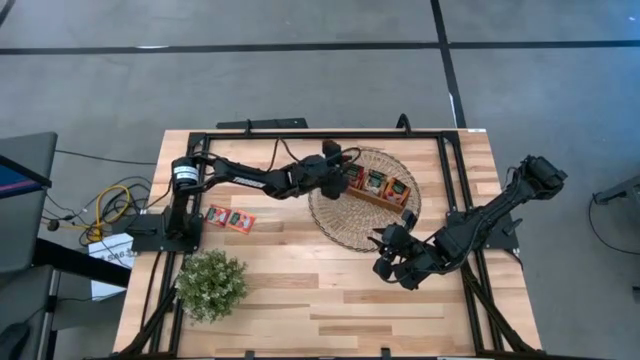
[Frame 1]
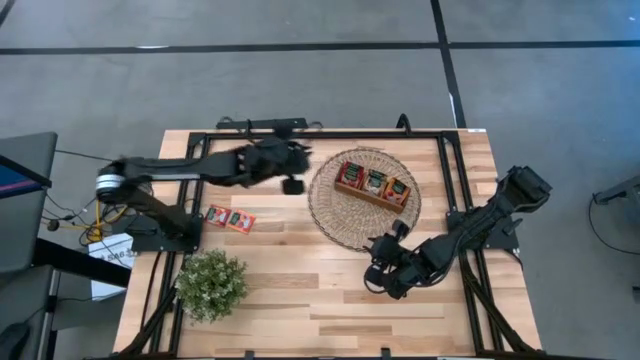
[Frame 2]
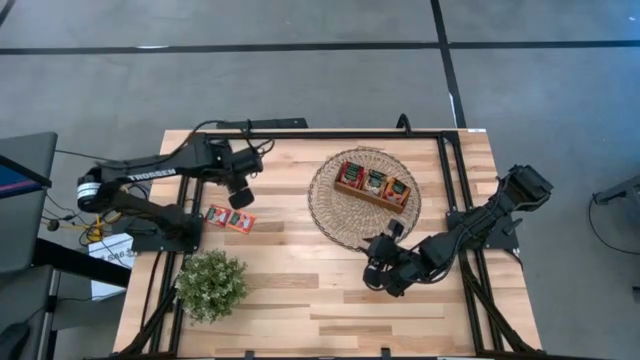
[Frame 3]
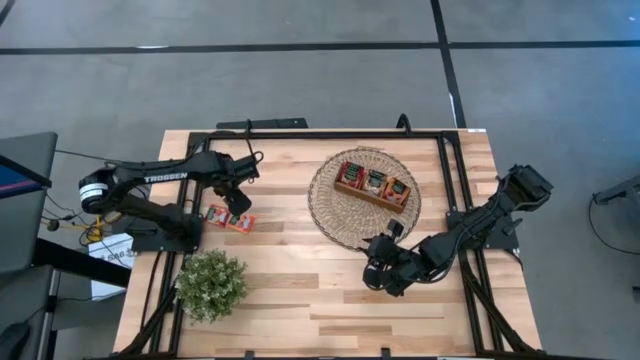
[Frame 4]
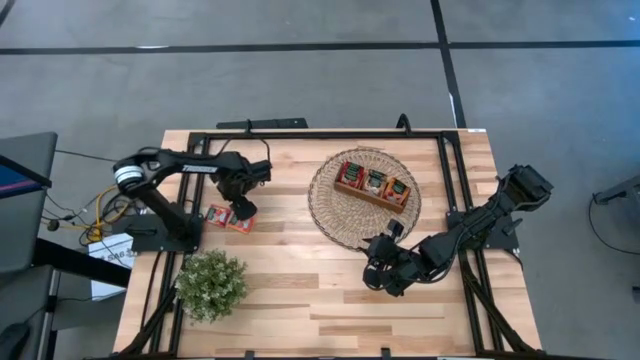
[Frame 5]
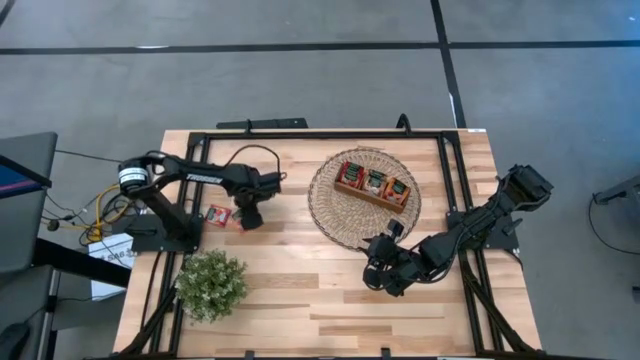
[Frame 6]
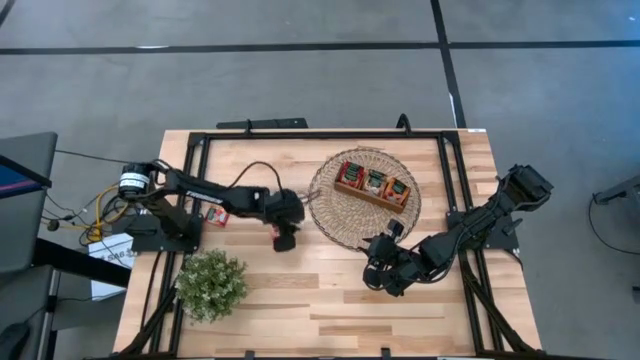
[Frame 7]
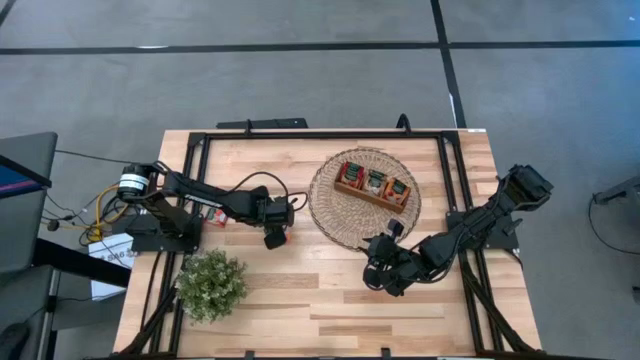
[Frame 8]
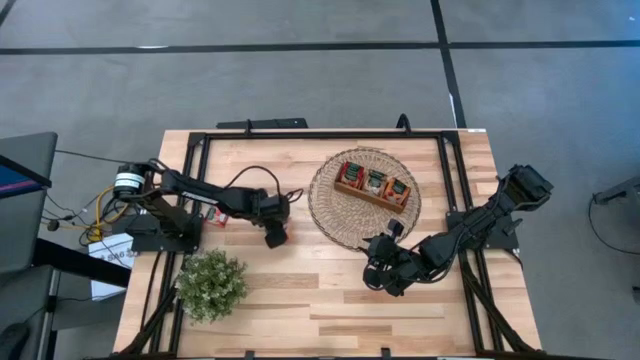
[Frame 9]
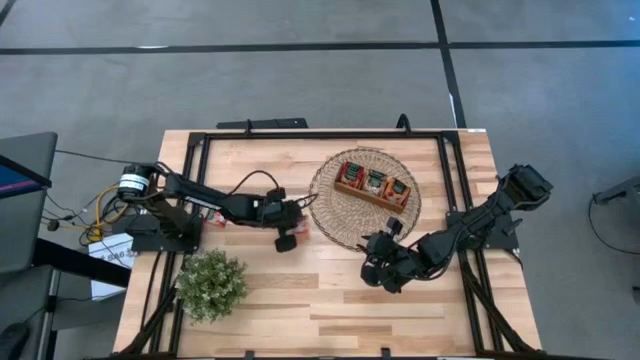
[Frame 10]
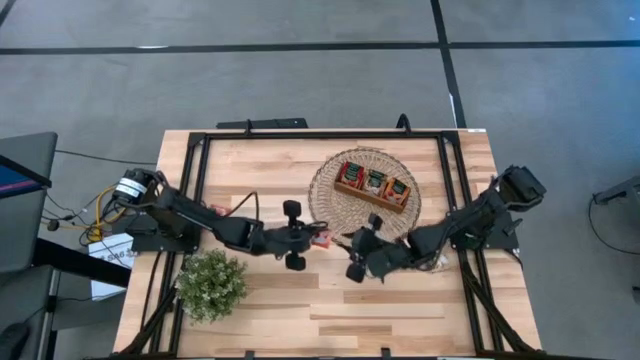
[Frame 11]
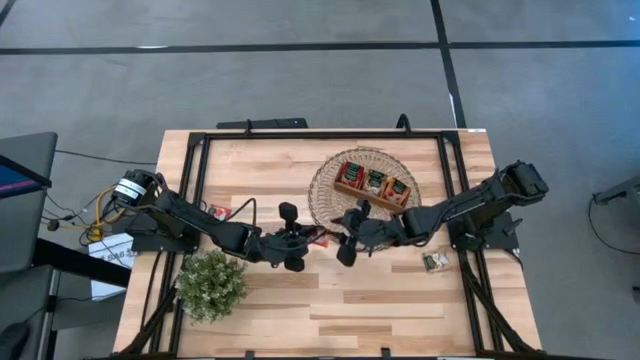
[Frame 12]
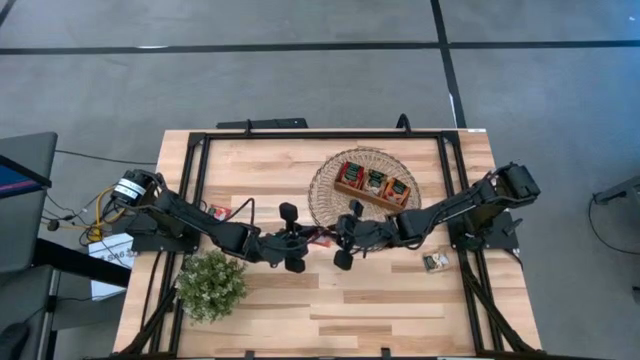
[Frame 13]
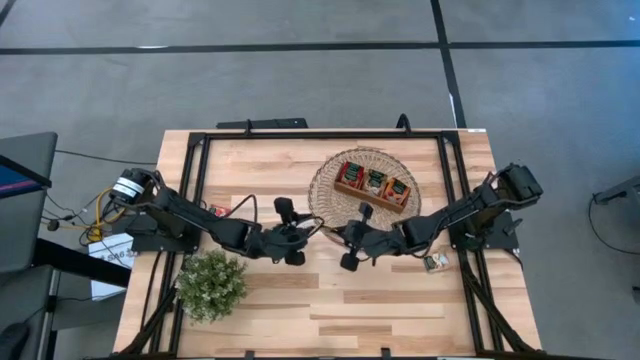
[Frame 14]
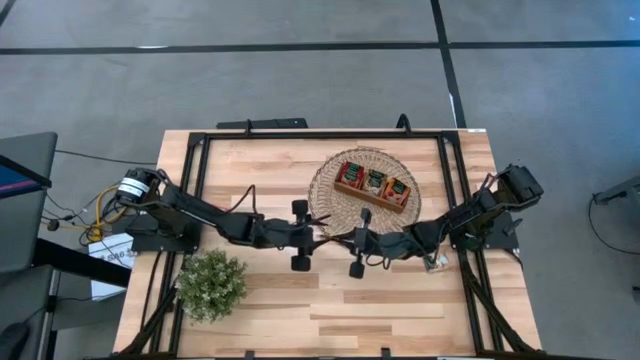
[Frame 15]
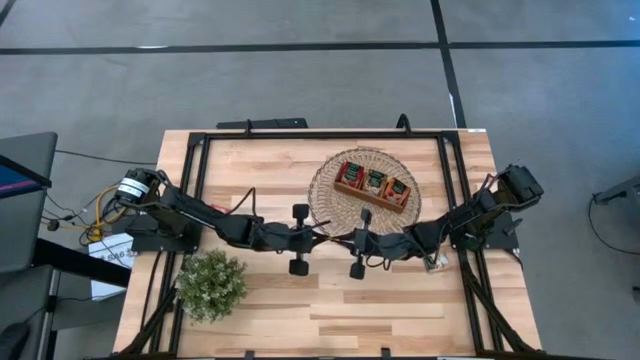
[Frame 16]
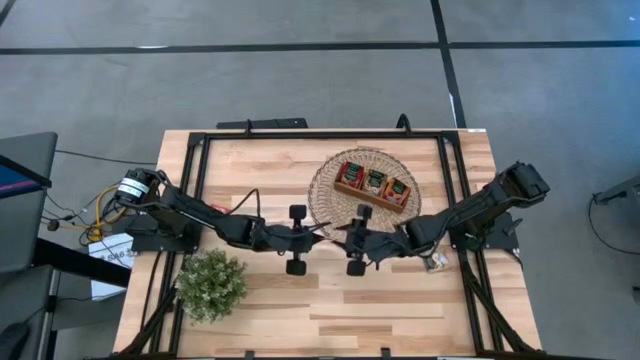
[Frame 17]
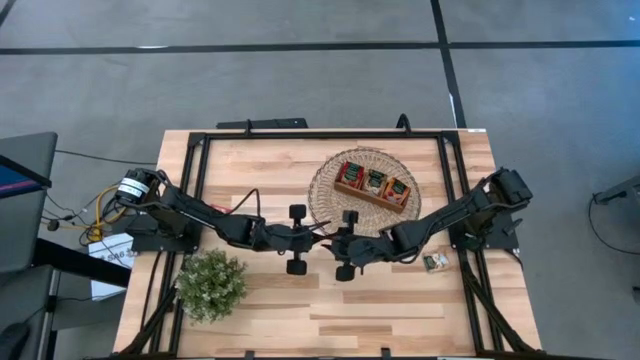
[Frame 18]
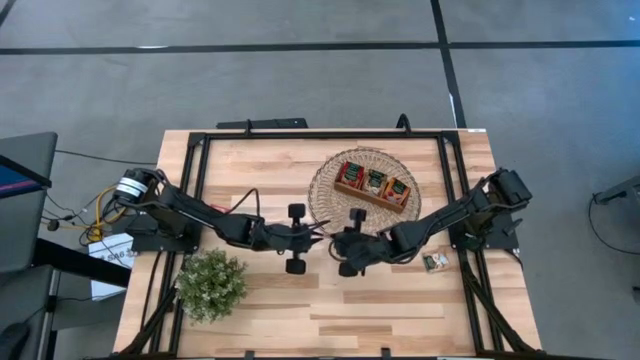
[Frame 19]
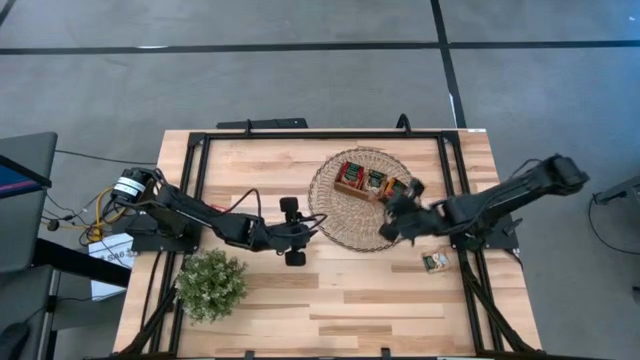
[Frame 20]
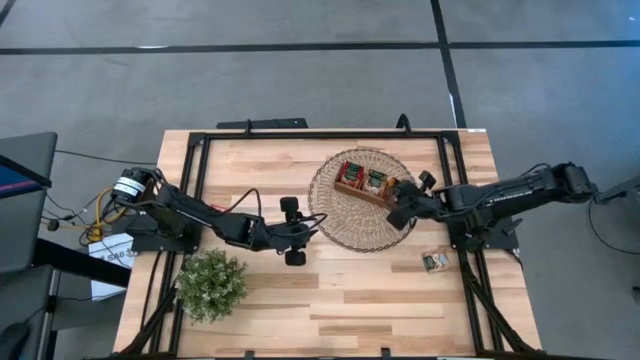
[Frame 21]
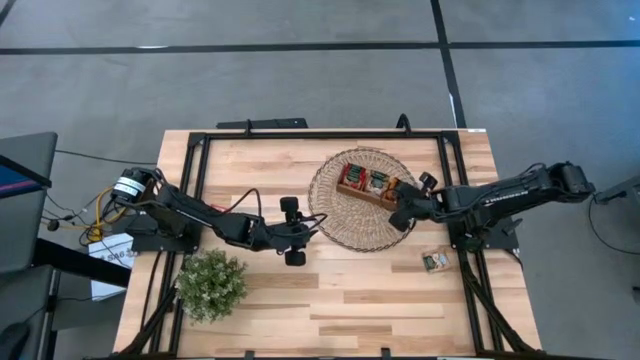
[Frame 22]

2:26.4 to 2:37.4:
Task: Pick & Place Tea
Put the orange tea bag into the right section of the wooden organizer

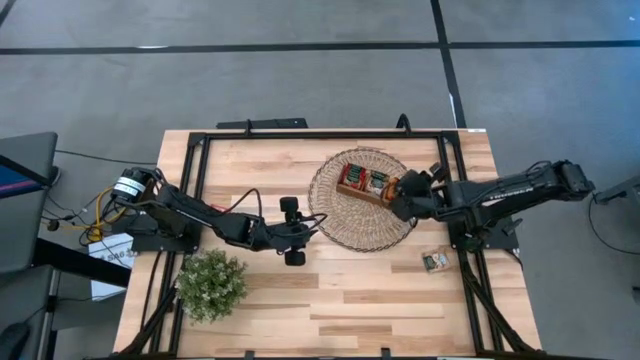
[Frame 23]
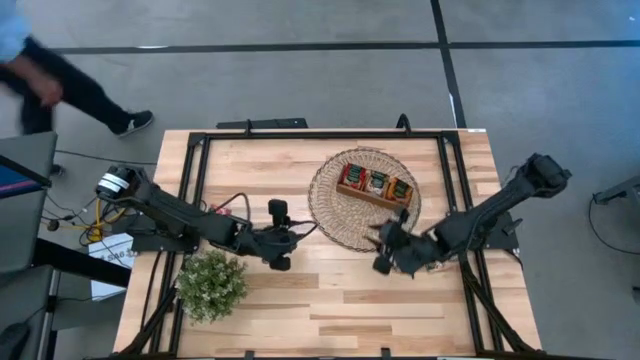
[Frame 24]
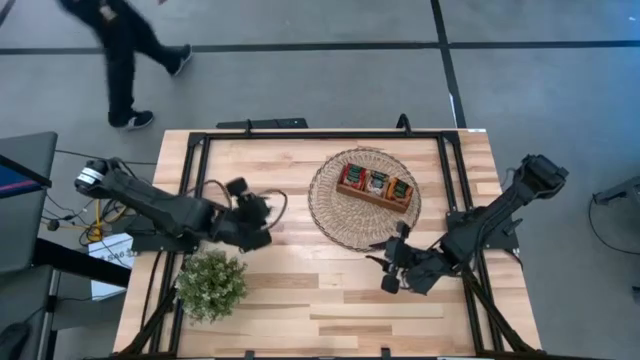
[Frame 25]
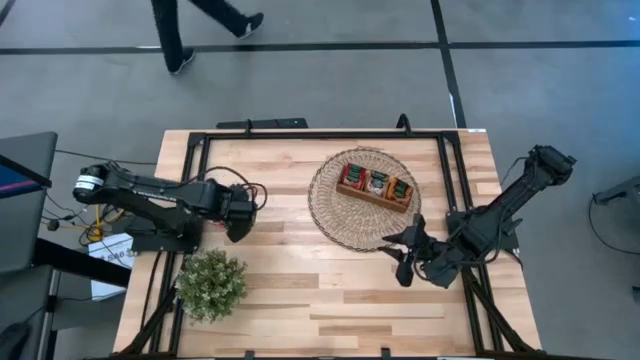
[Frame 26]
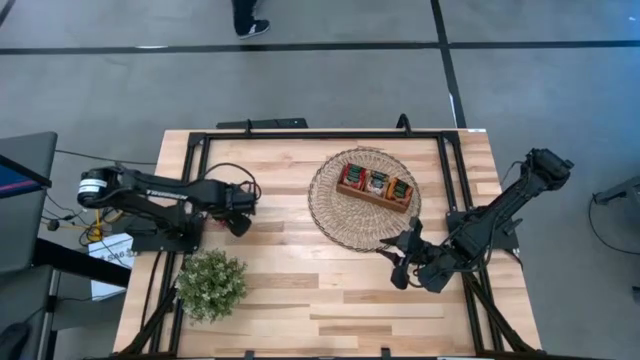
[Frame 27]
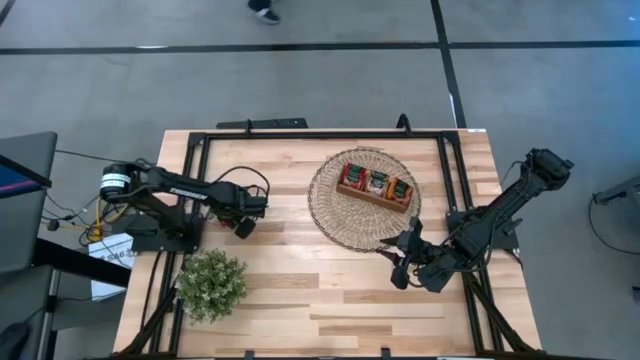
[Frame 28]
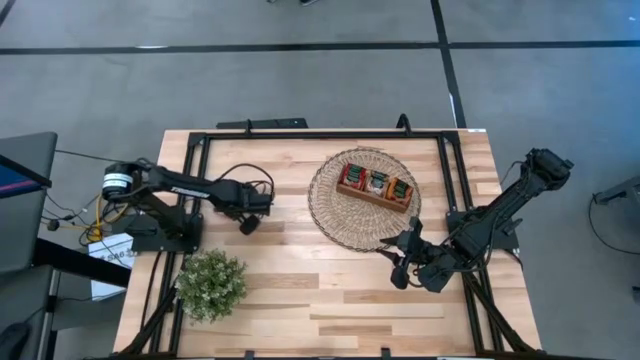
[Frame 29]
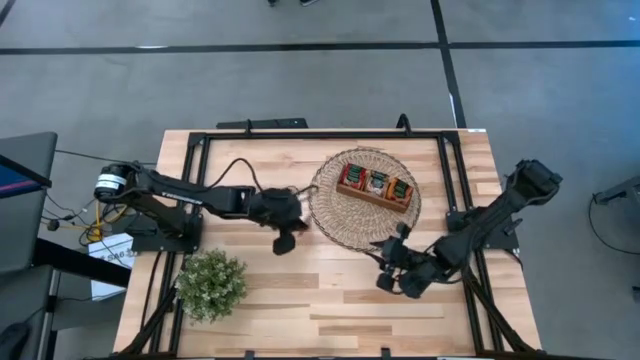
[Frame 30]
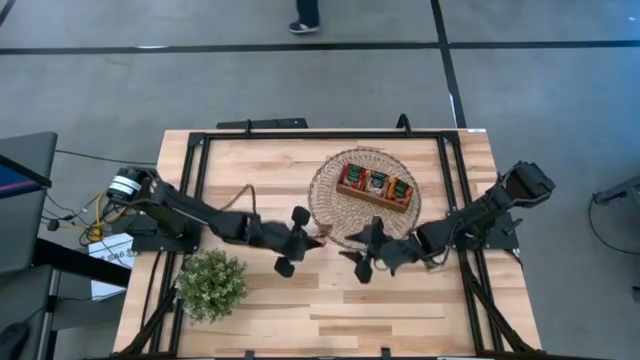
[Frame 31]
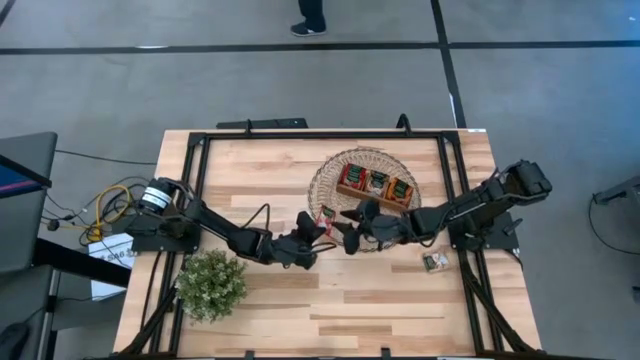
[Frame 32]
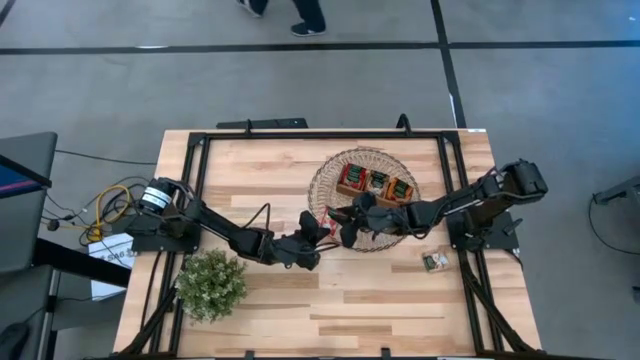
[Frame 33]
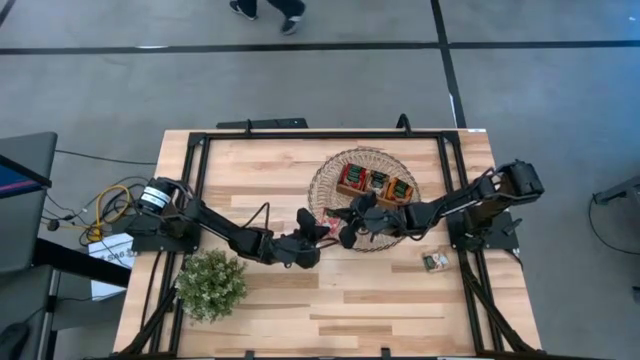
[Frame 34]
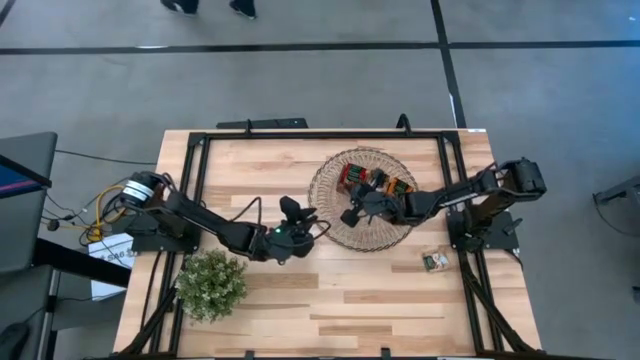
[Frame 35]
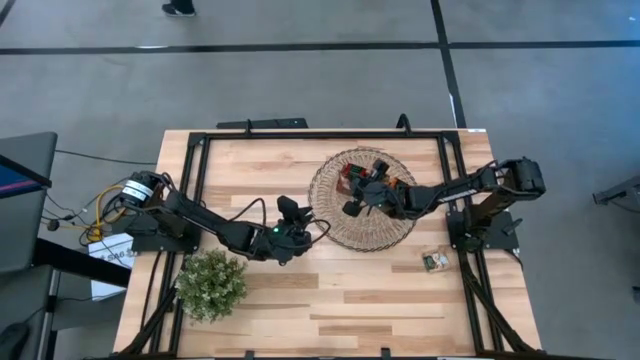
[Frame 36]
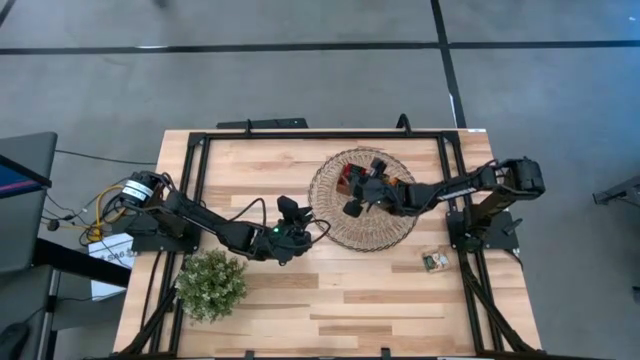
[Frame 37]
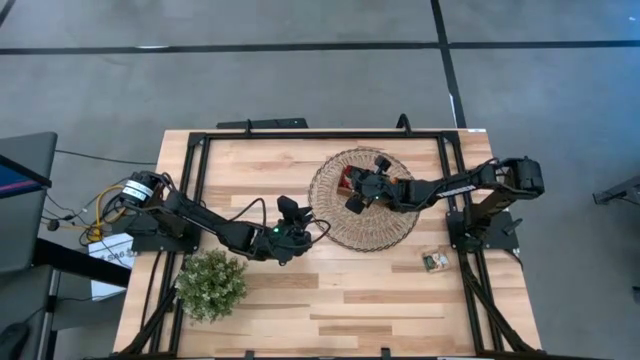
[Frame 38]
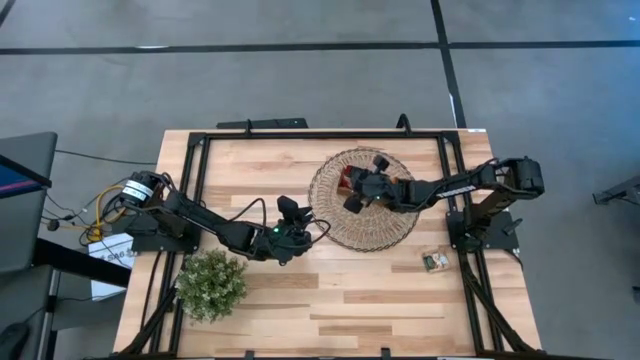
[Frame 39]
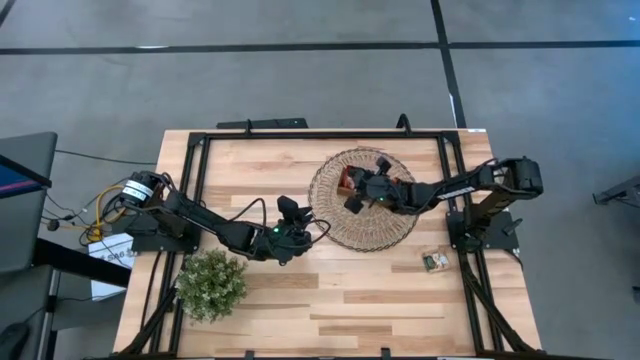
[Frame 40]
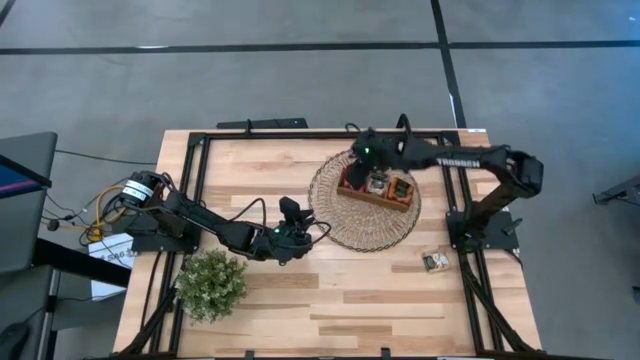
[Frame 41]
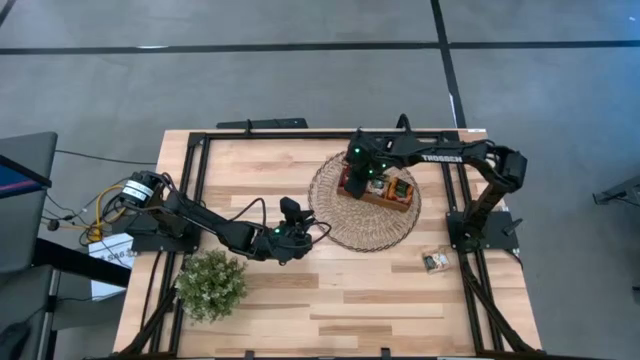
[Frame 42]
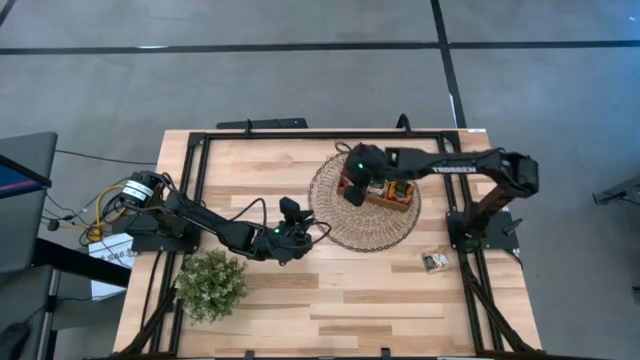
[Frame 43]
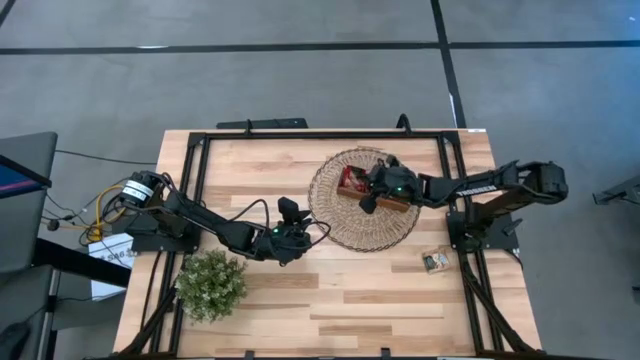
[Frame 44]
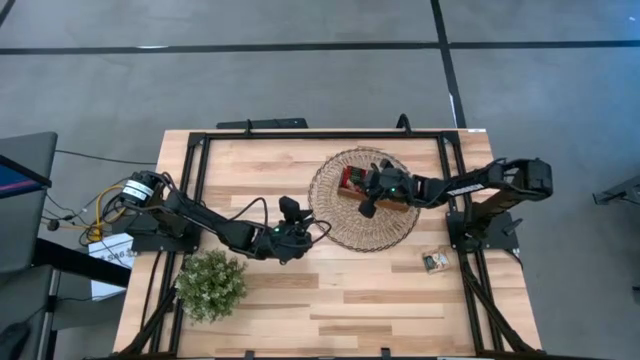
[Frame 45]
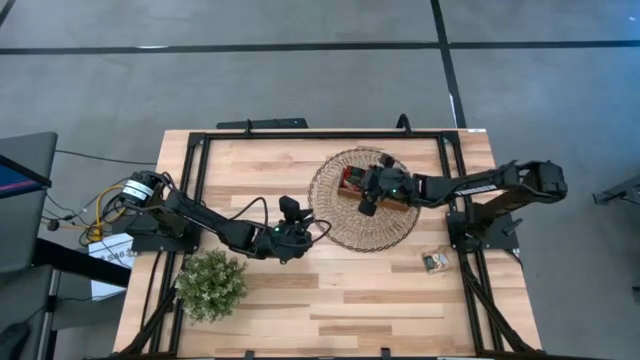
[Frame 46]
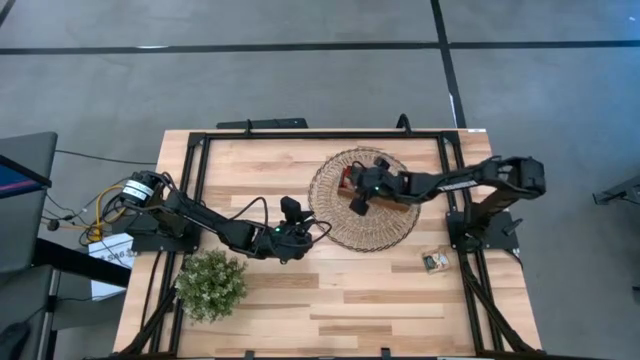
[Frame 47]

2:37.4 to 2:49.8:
Put the red tea bag into the left section of the wooden organizer
